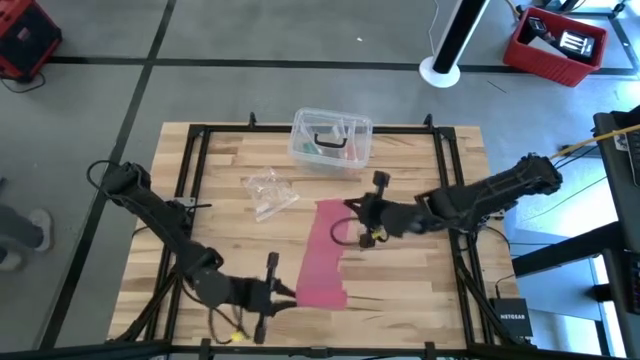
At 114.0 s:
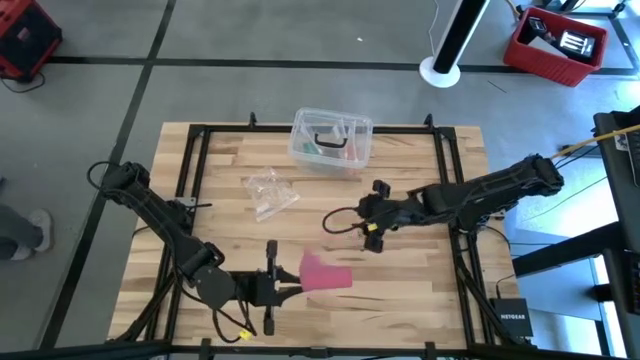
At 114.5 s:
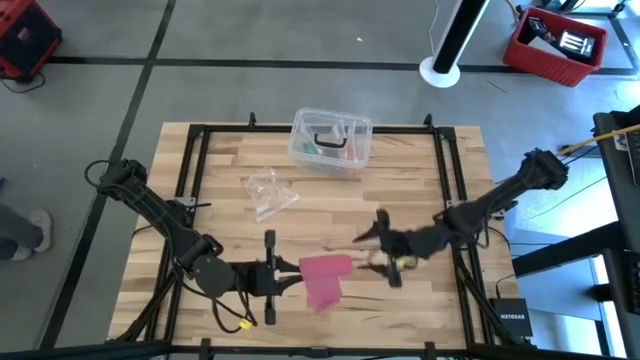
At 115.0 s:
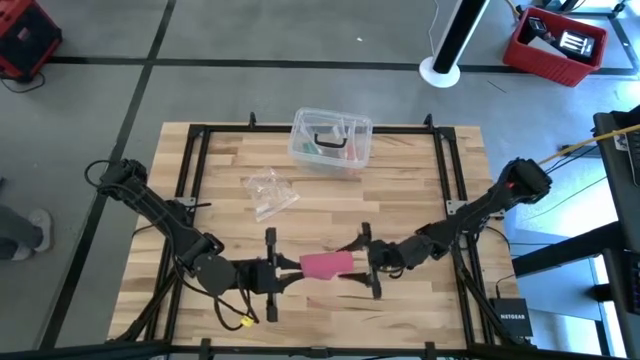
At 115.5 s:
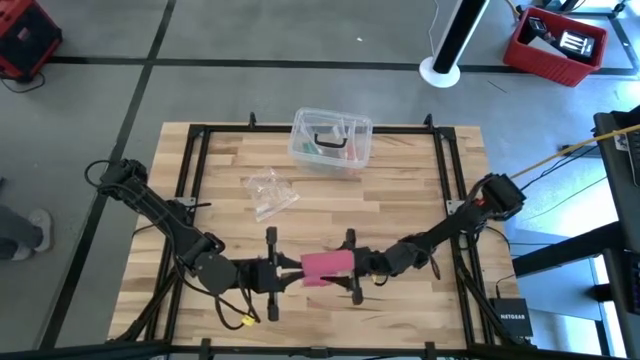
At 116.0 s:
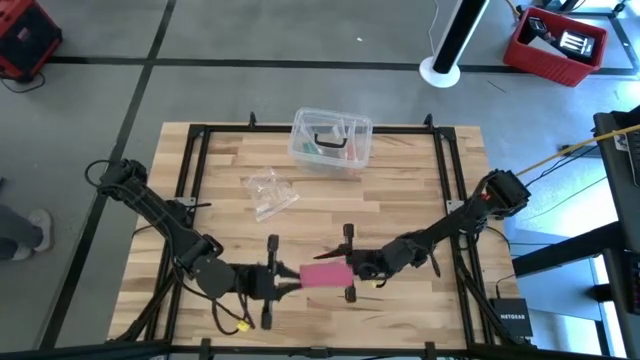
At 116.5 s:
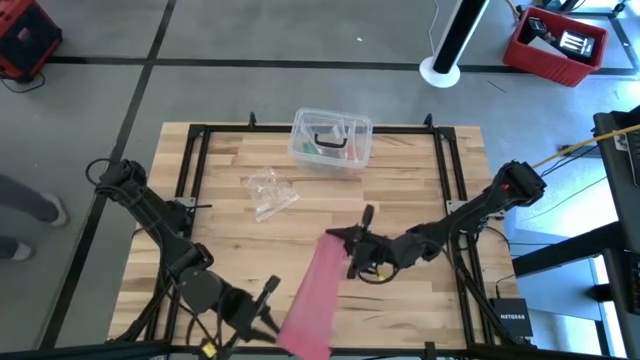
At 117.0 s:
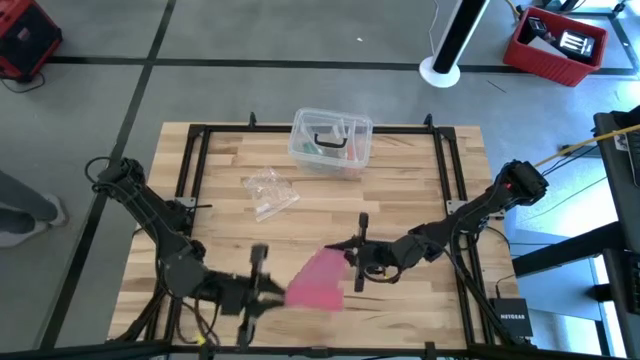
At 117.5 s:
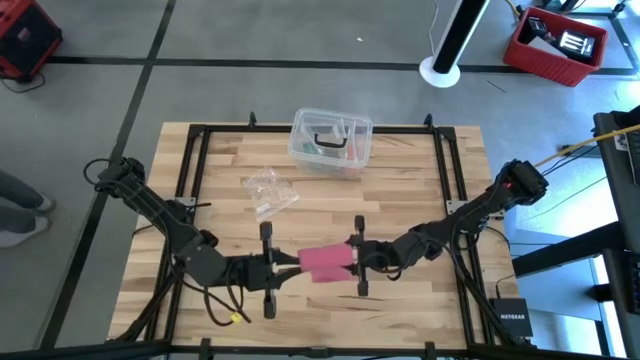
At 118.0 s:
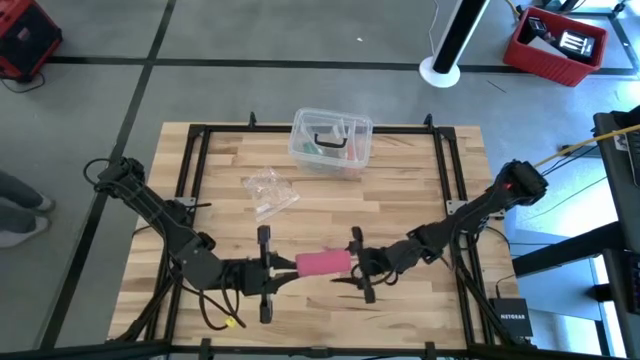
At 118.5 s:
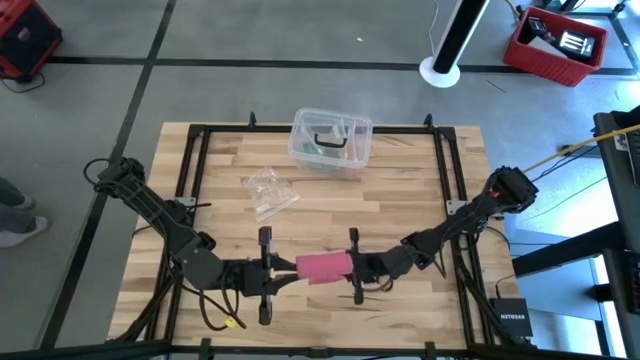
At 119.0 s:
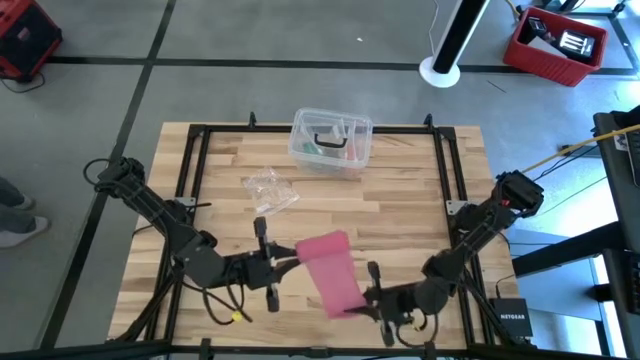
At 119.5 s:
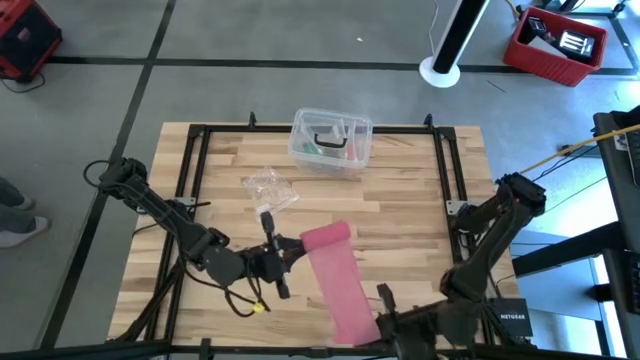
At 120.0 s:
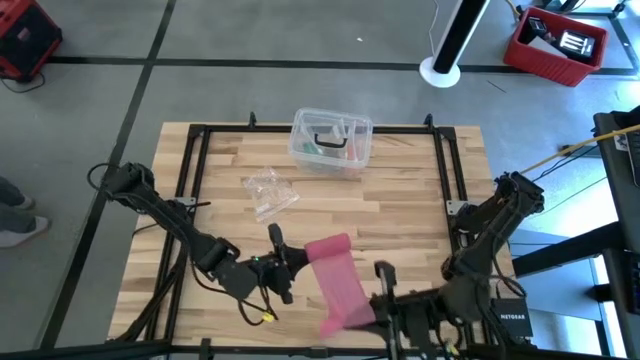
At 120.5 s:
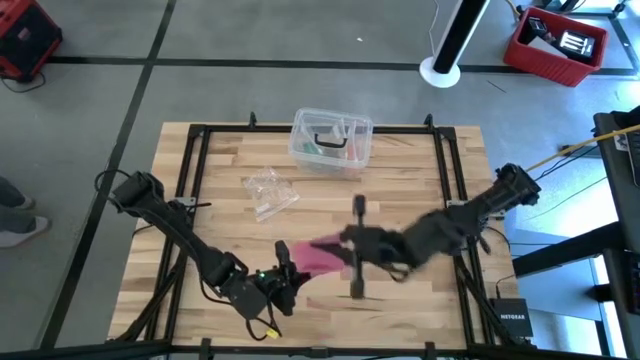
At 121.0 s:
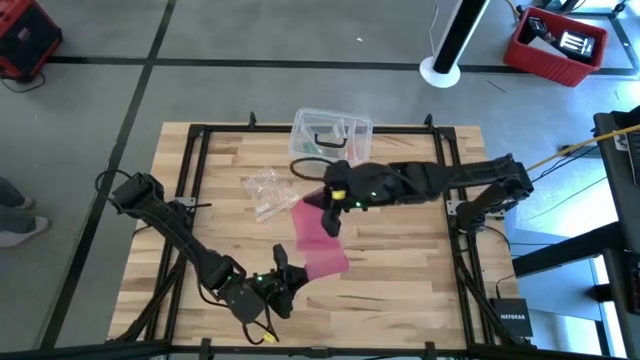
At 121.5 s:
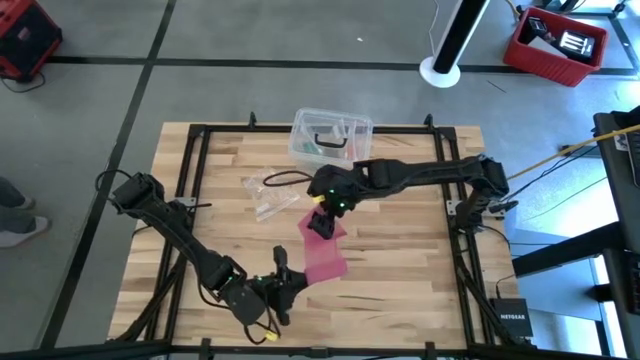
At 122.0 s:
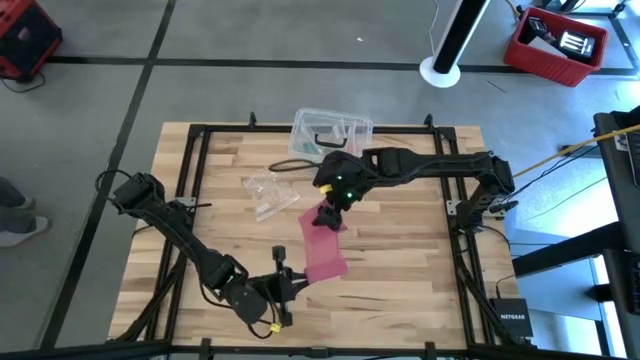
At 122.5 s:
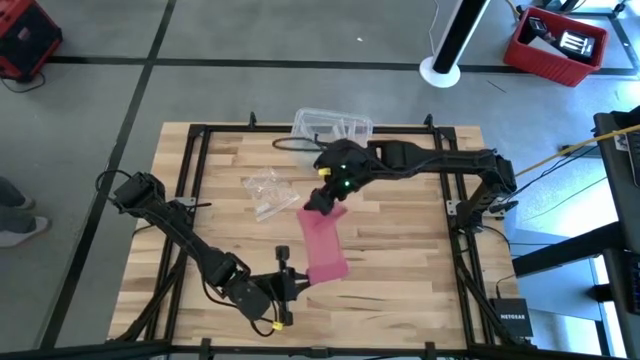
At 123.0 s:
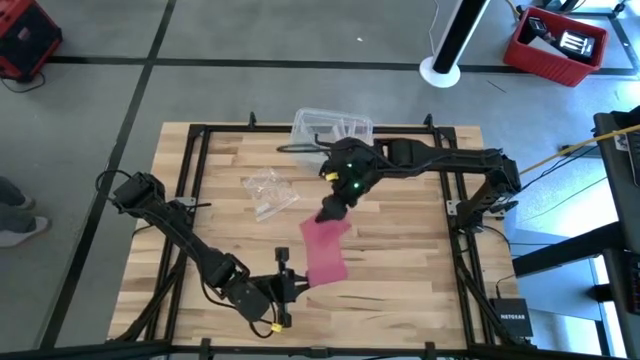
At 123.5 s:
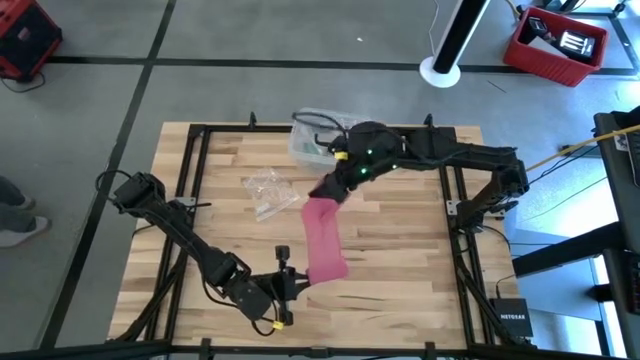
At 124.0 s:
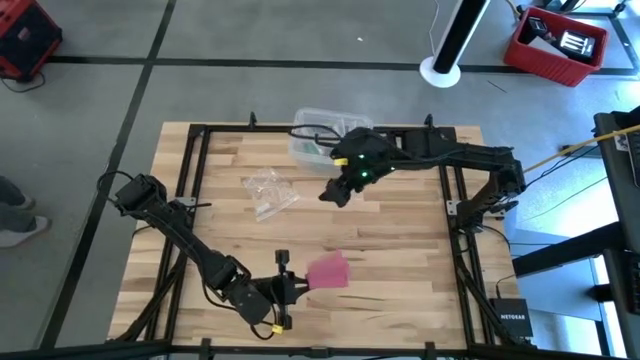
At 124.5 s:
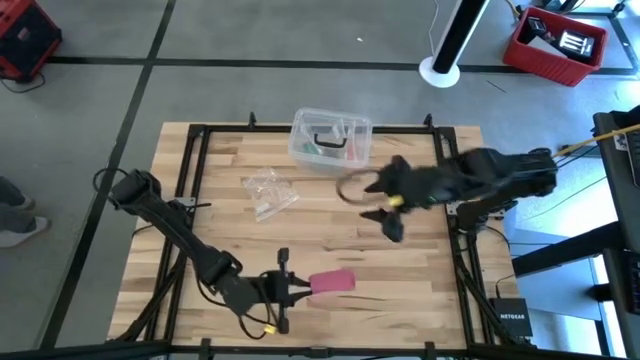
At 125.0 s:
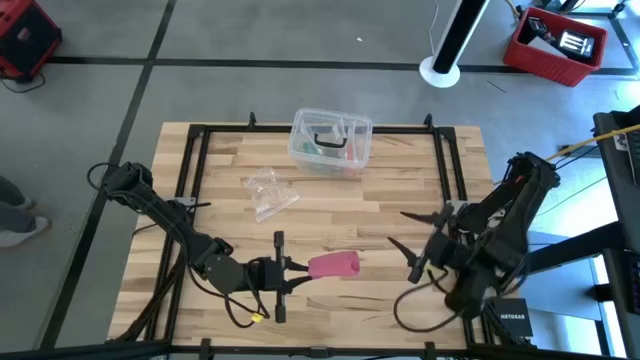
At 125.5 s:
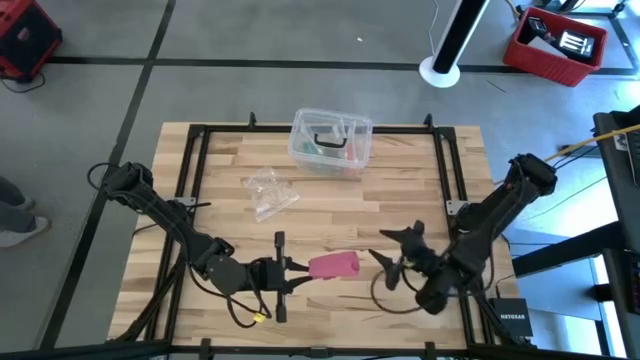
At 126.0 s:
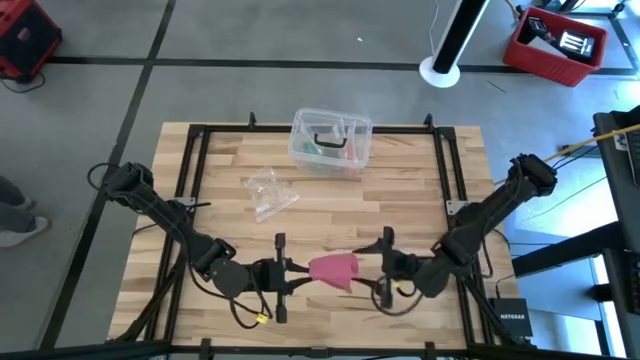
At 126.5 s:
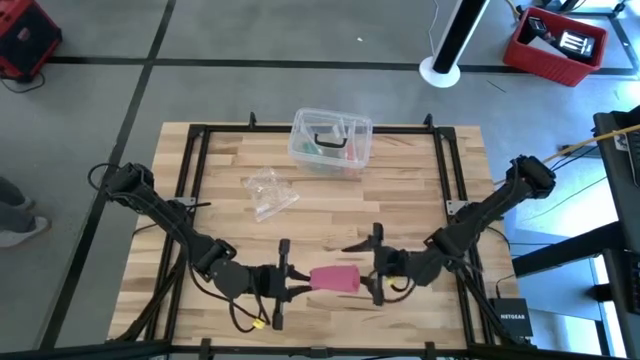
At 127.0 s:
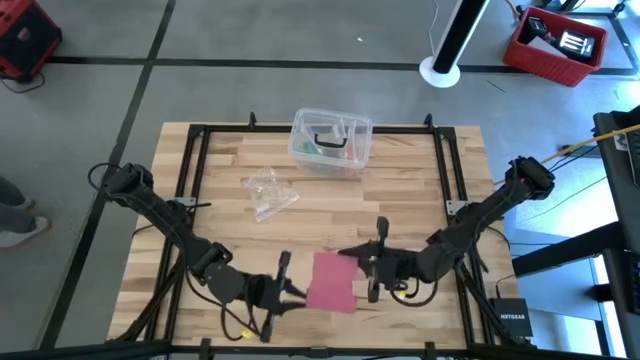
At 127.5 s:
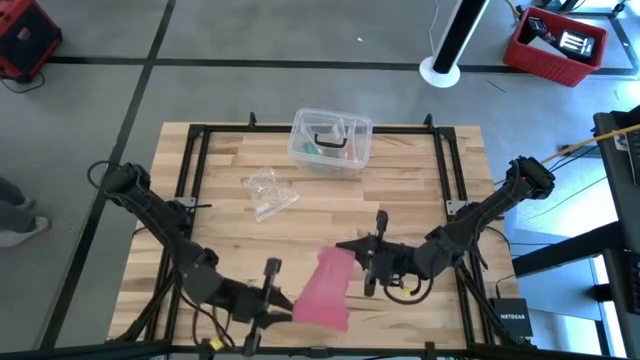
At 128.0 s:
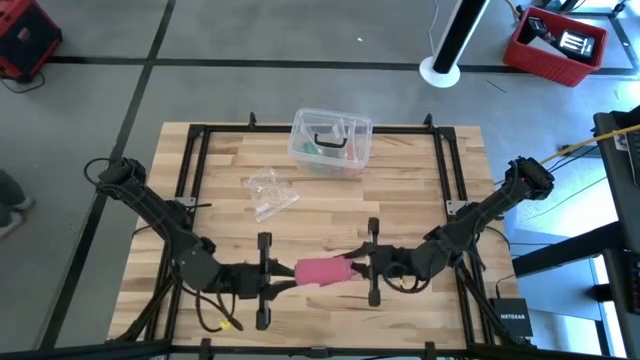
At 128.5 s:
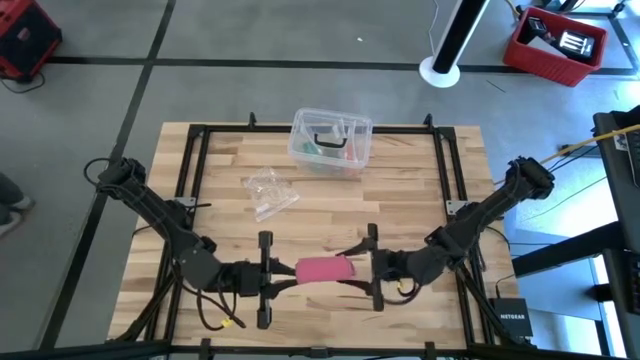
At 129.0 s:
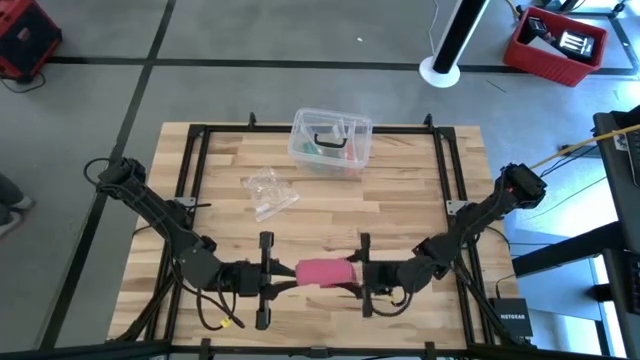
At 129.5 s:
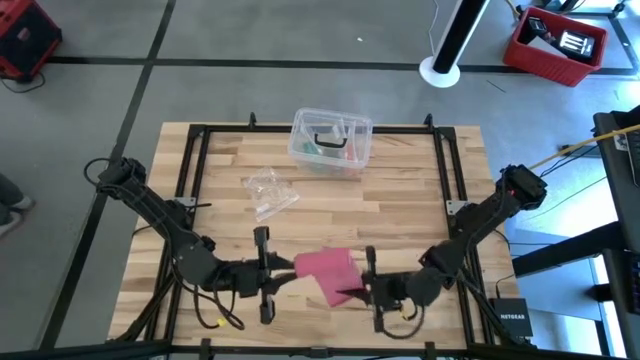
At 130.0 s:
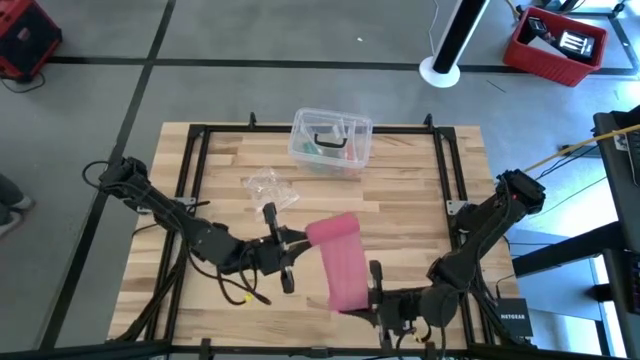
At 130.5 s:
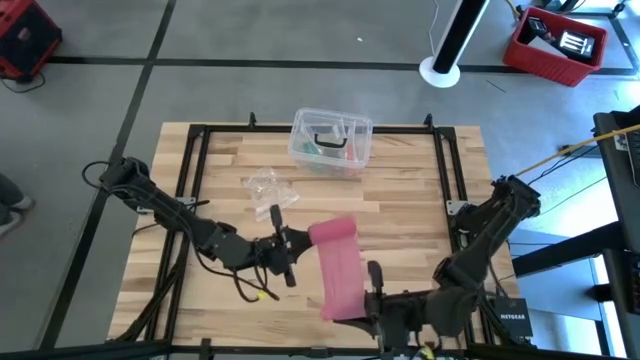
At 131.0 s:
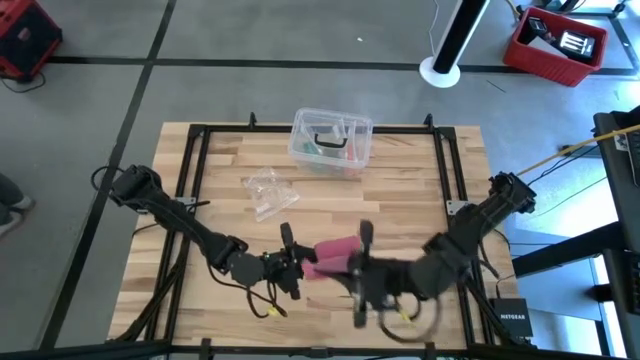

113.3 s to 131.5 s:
Task: Roll bandage
Roll the pink bandage

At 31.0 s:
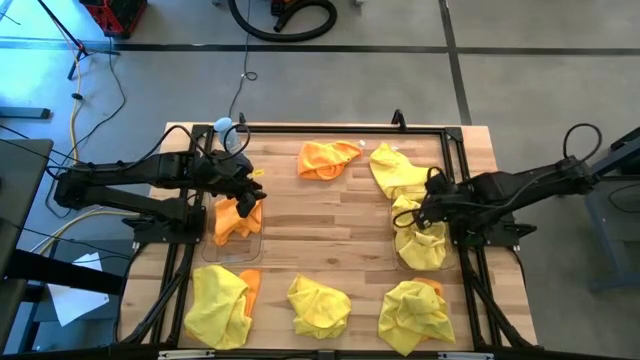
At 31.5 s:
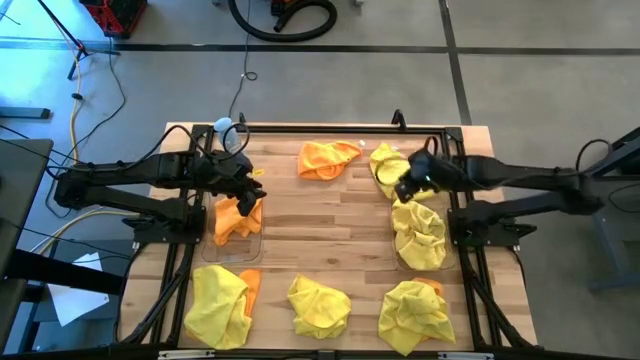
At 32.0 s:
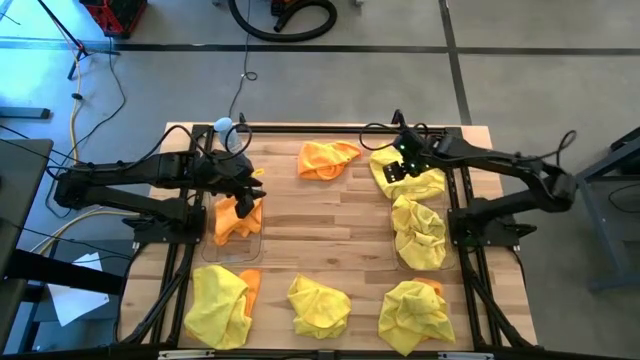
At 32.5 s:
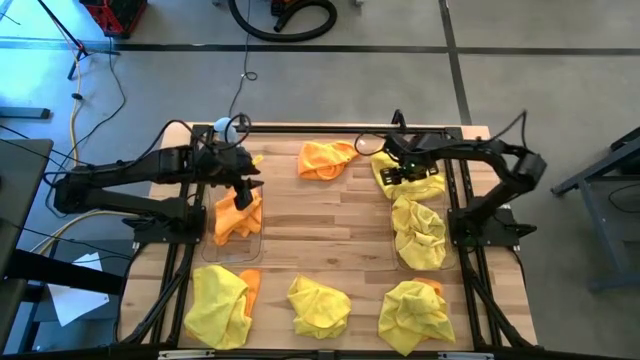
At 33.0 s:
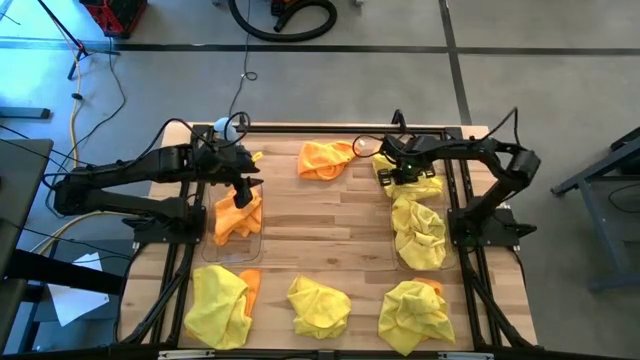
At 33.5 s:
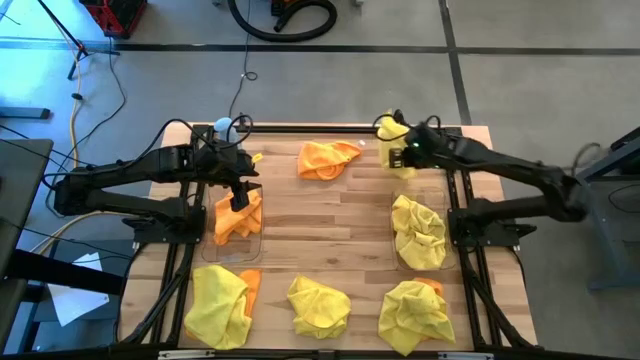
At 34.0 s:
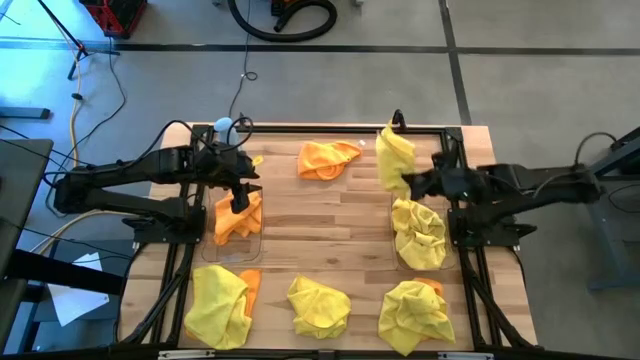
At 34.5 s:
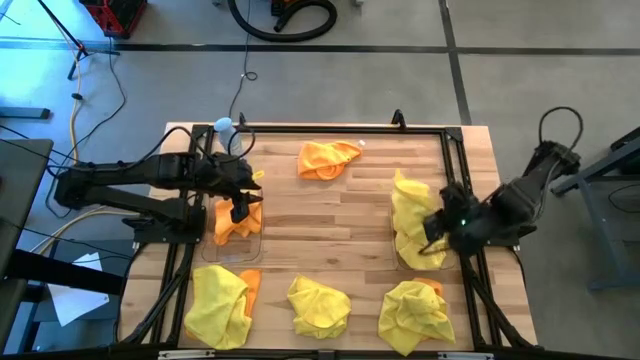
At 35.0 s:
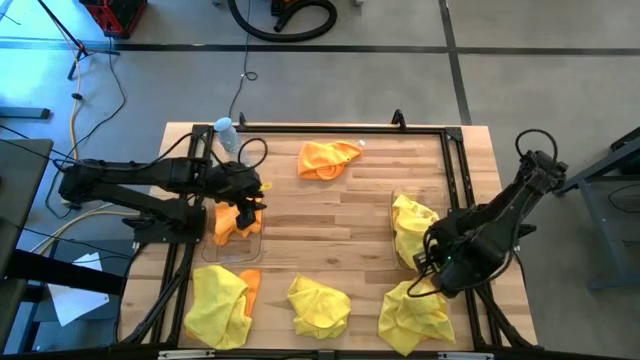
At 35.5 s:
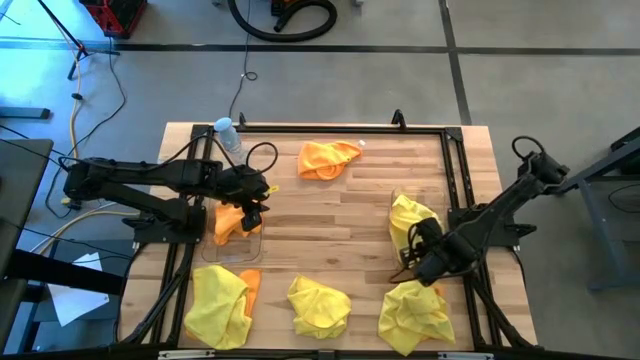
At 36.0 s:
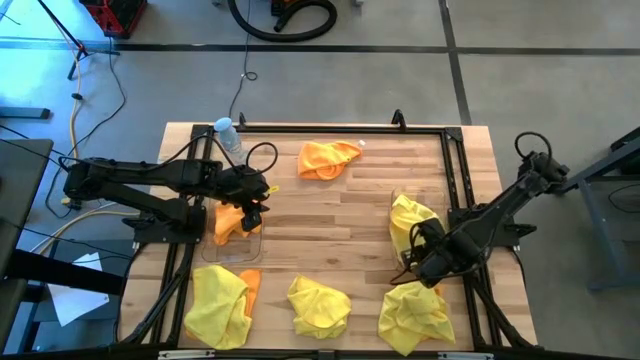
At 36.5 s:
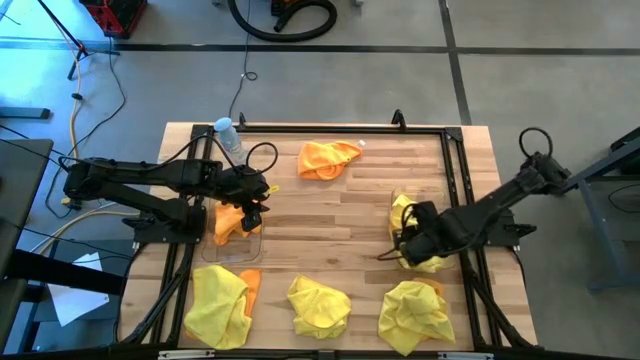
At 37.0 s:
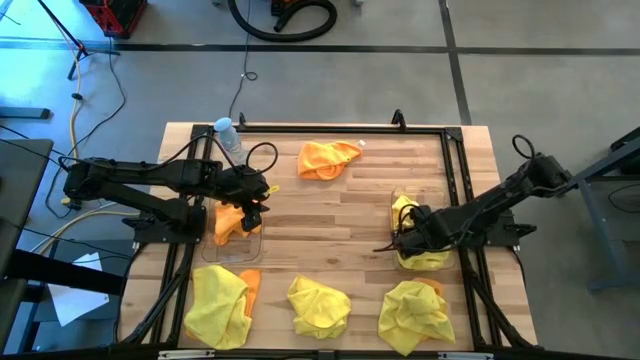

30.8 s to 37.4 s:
Task: Sort microfiber towel by color & place in baskets
Put the yellow towel into the right transparent bin
